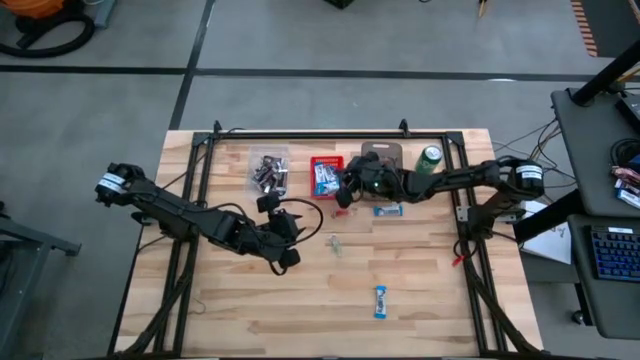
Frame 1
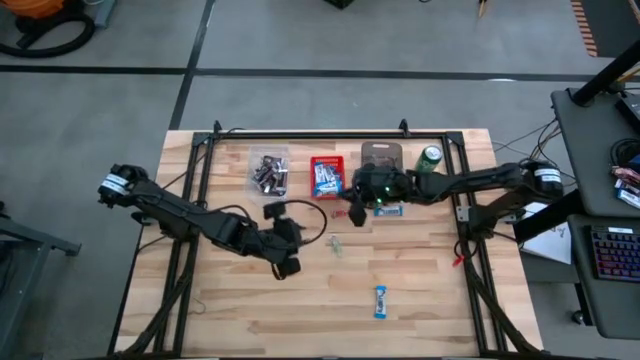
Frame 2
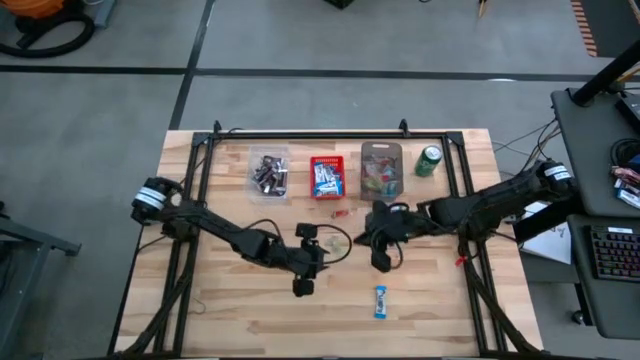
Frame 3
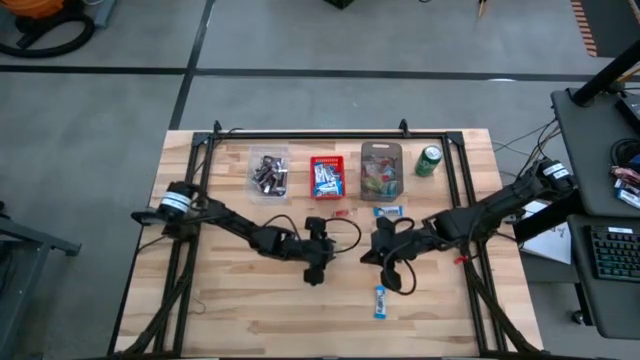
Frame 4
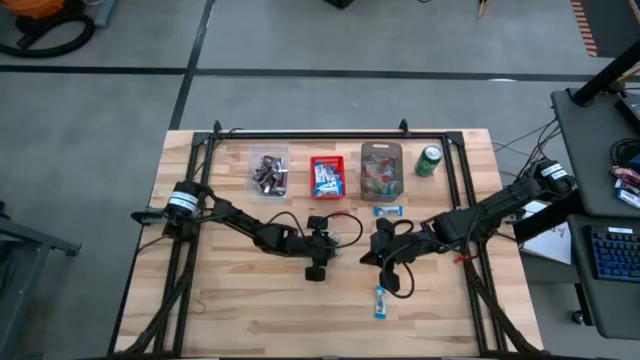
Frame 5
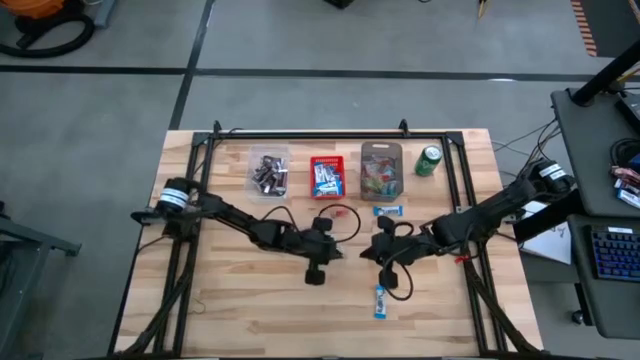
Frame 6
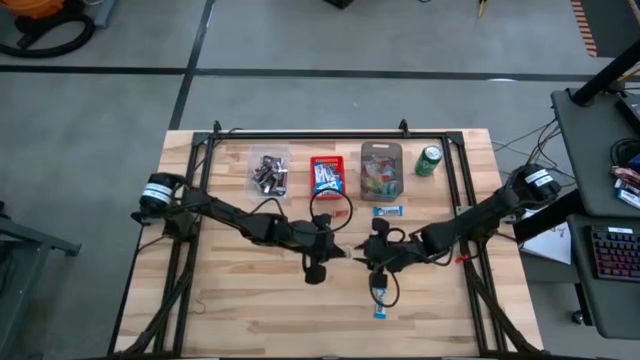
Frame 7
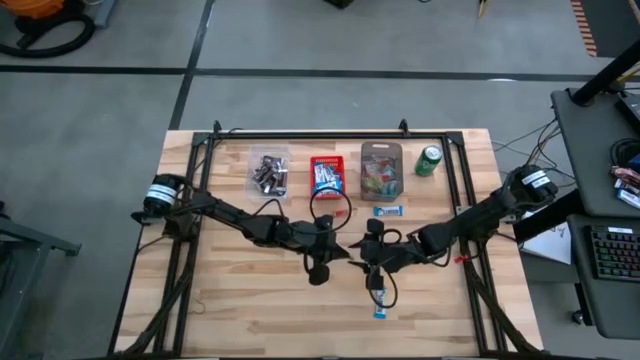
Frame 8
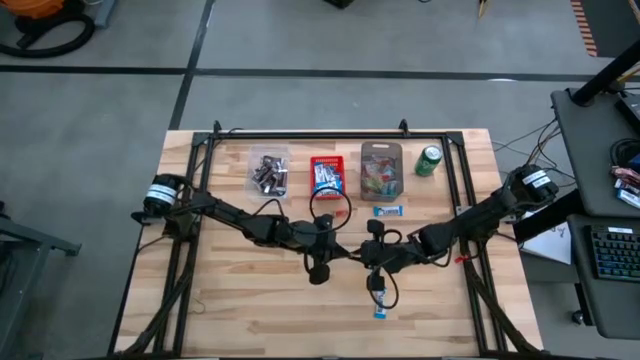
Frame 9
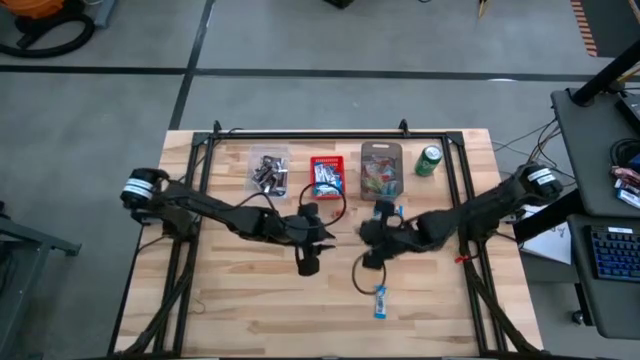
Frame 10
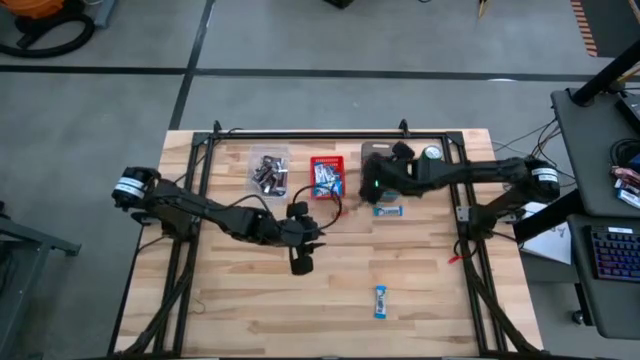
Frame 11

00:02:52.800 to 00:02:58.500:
Task: Sort candy
Put the green gummy candy into the black bin

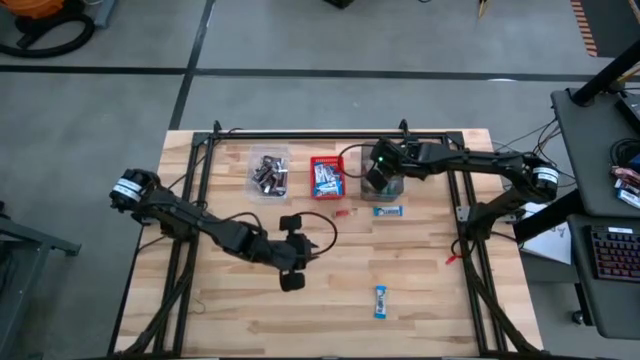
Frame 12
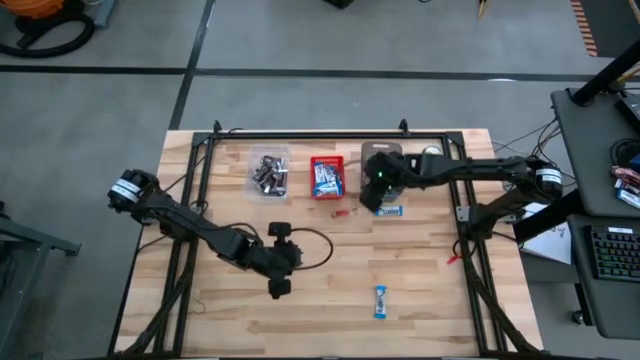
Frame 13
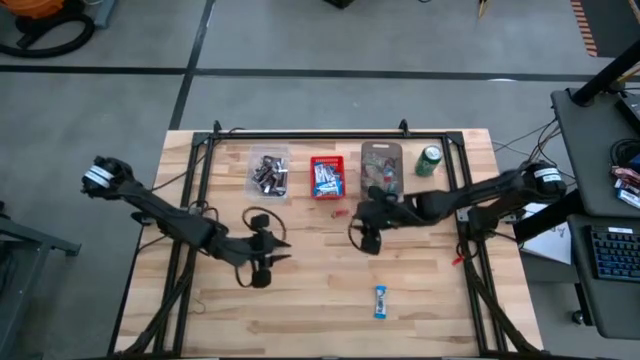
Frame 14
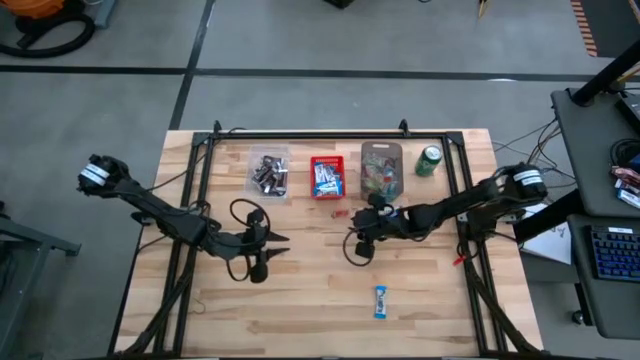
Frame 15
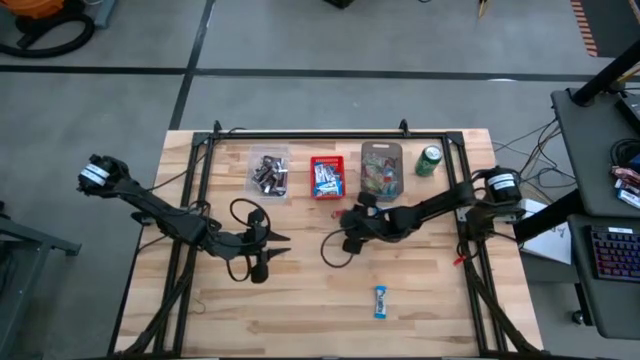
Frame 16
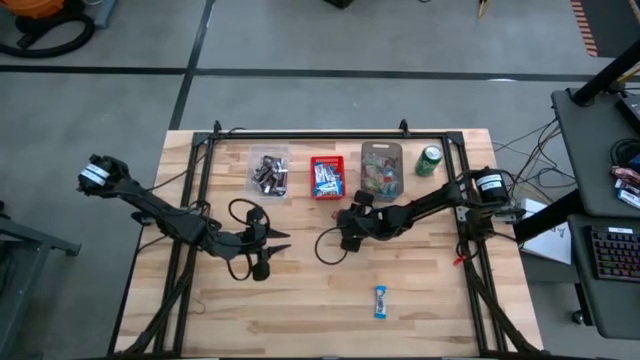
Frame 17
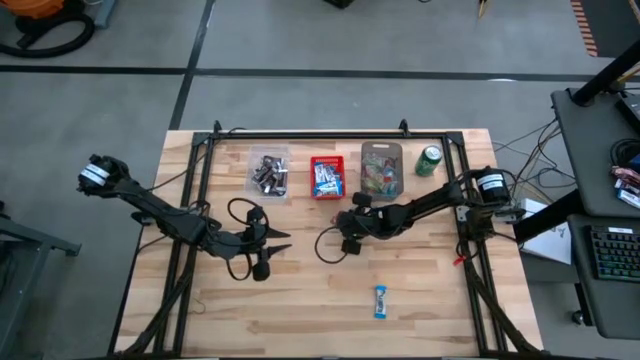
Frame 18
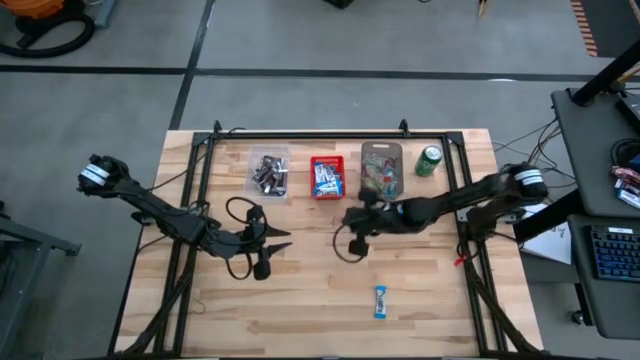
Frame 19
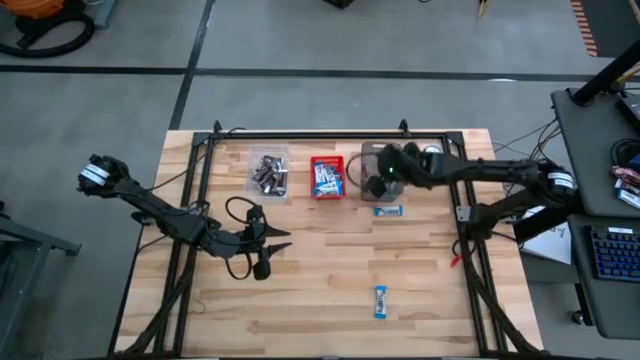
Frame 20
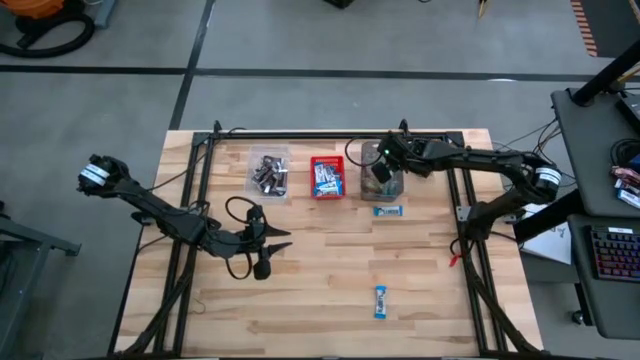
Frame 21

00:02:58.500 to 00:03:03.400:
Put the red gummy candy into the black bin

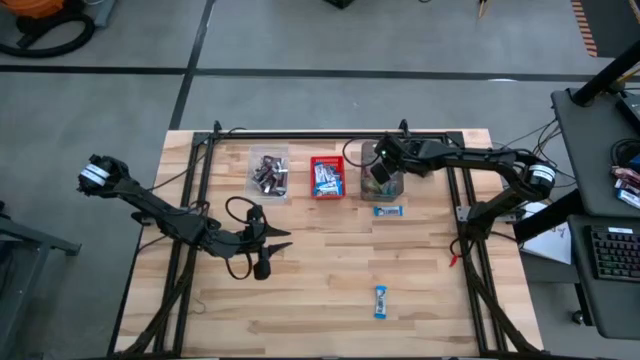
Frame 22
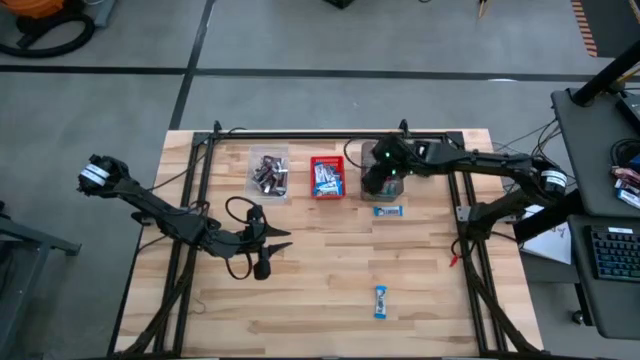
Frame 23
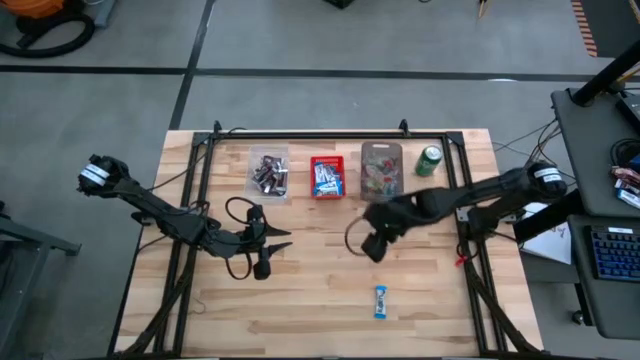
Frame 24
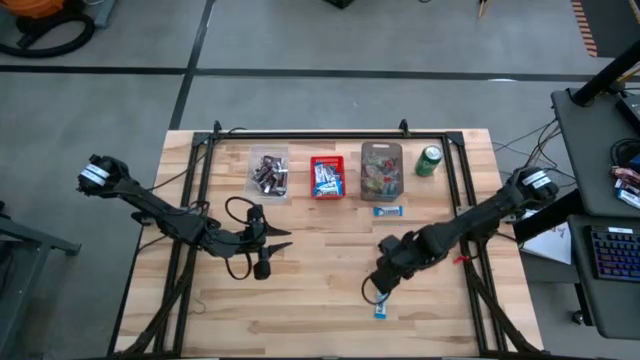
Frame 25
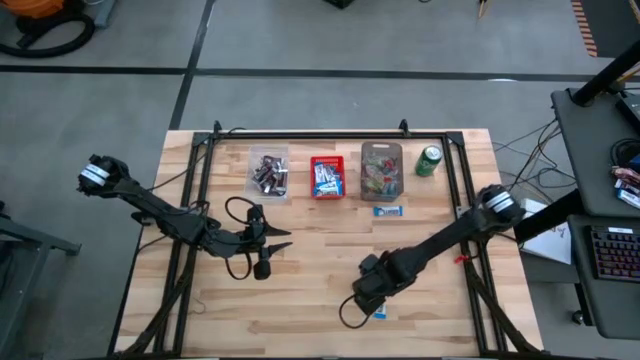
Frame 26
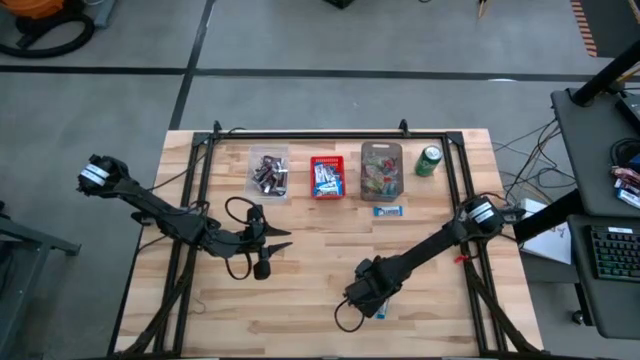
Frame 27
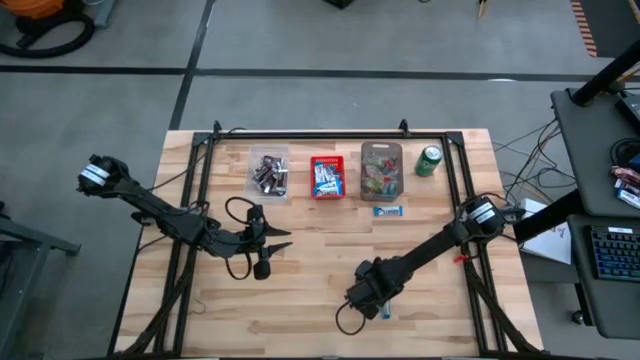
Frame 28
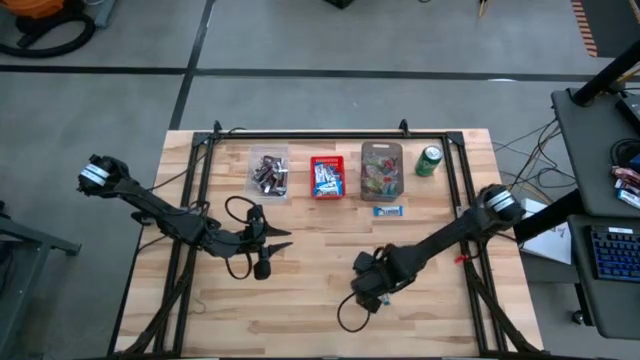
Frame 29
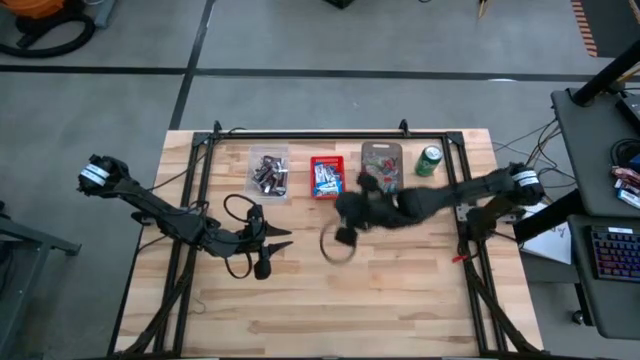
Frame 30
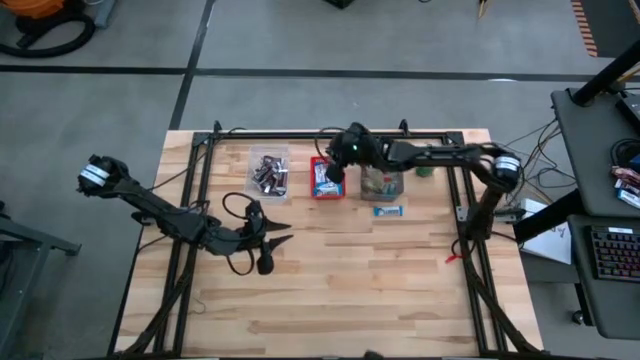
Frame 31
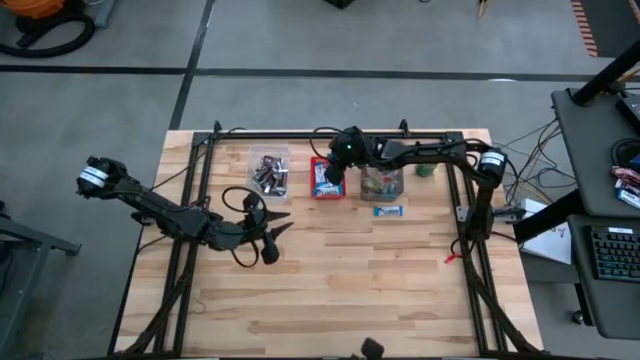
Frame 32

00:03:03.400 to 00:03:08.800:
Put the white chocolate bar into the red bin

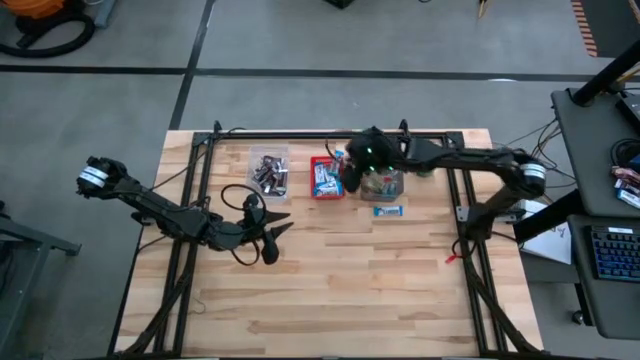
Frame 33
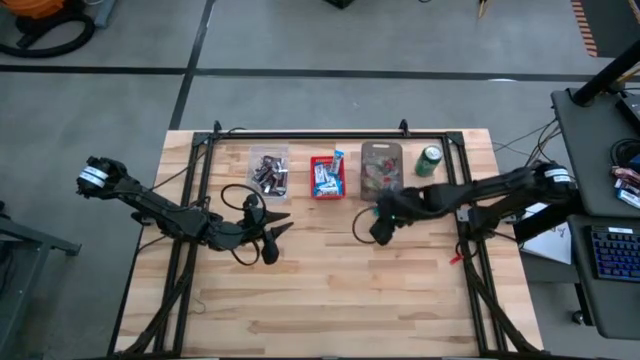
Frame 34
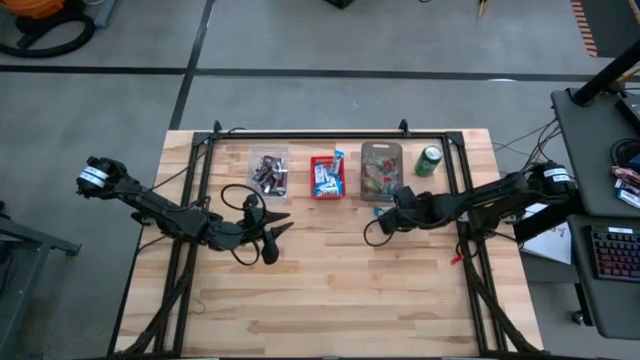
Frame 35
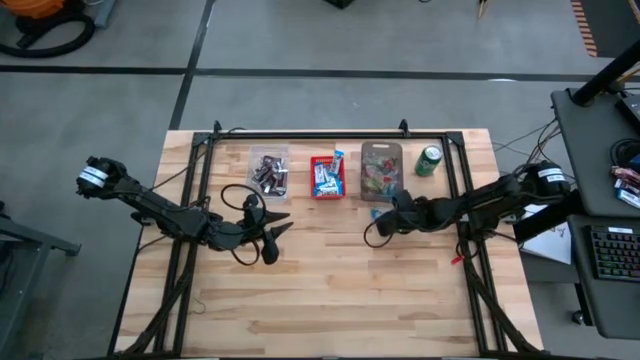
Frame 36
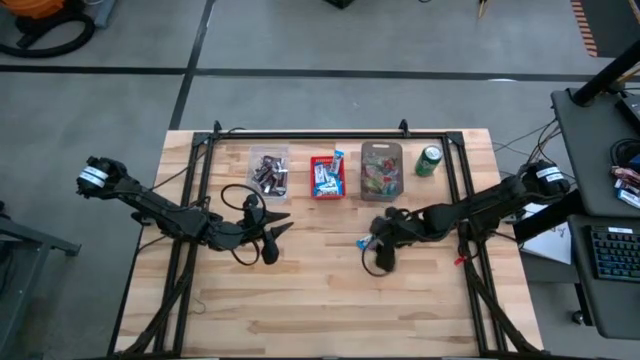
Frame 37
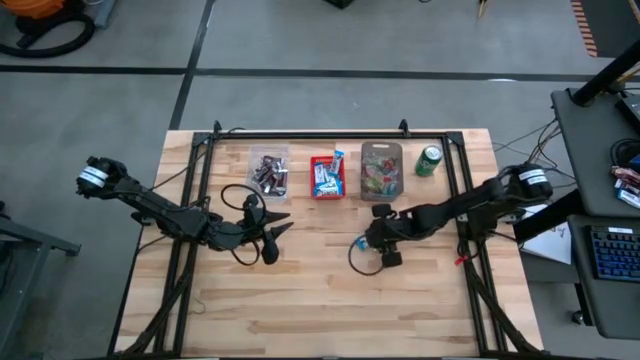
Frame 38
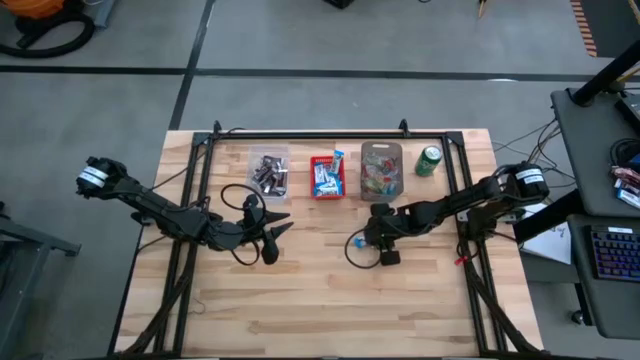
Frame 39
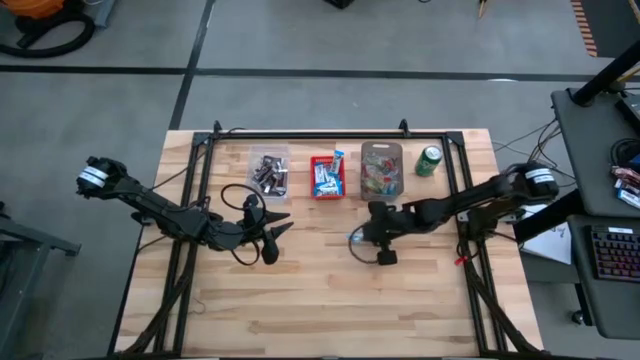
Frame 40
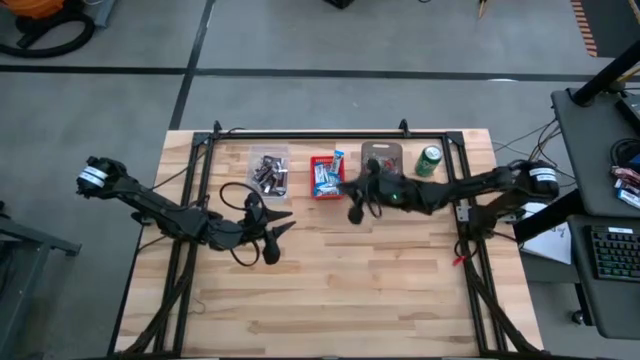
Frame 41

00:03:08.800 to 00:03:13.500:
Put the white chocolate bar into the red bin
